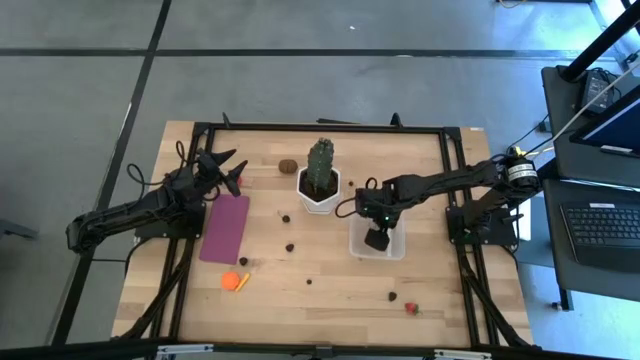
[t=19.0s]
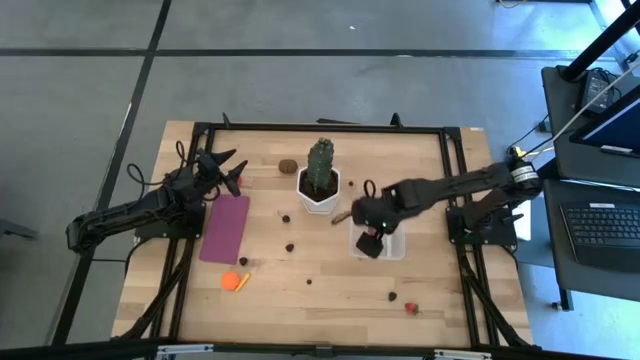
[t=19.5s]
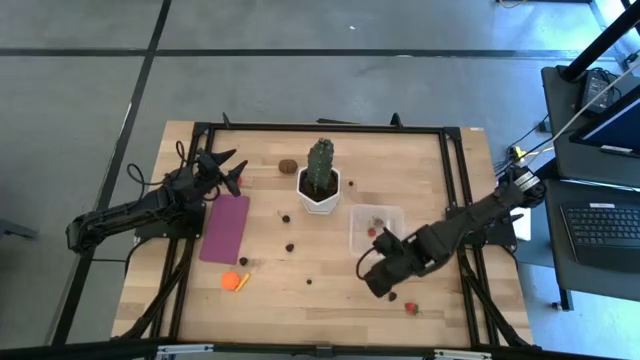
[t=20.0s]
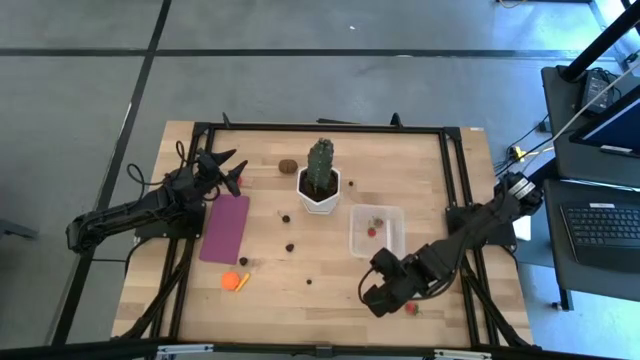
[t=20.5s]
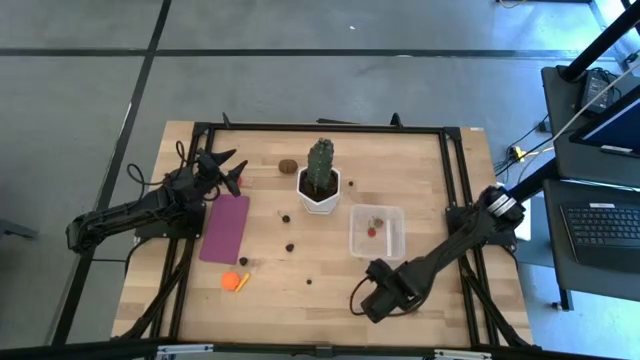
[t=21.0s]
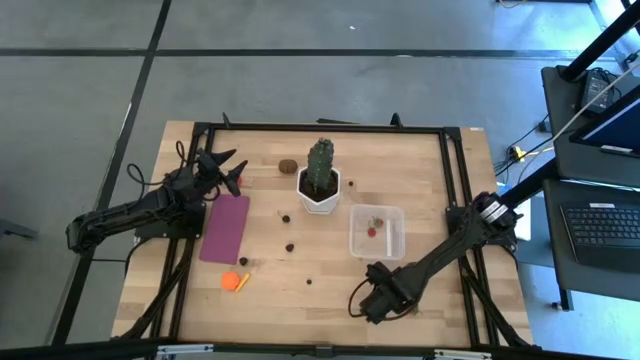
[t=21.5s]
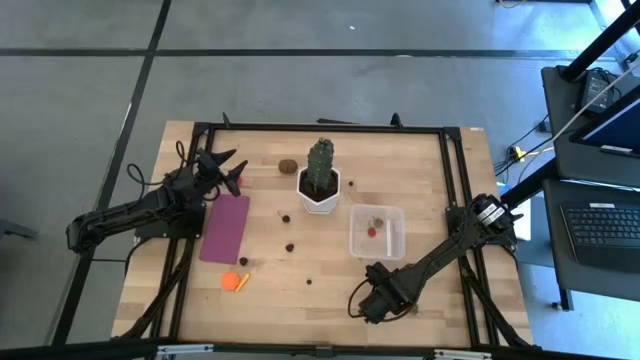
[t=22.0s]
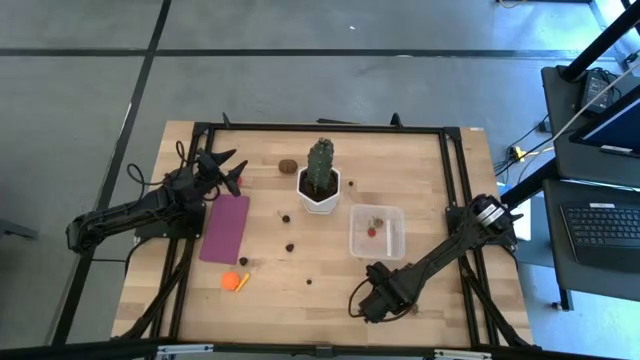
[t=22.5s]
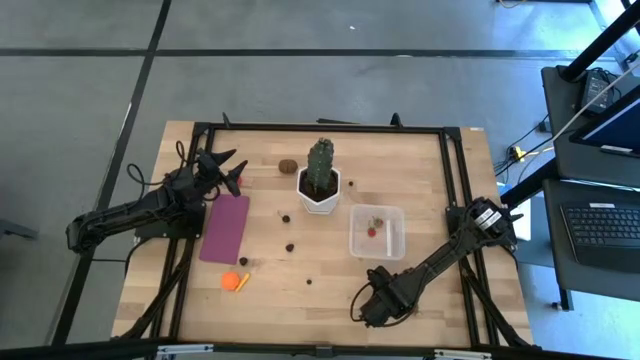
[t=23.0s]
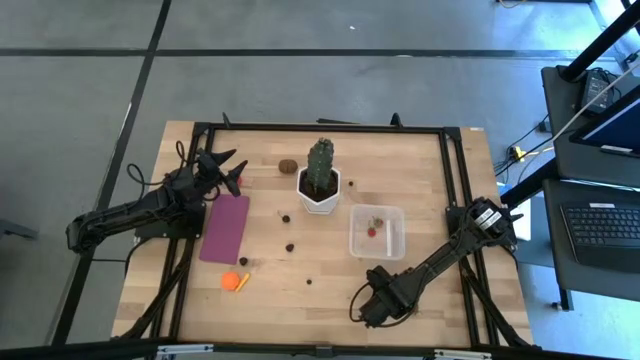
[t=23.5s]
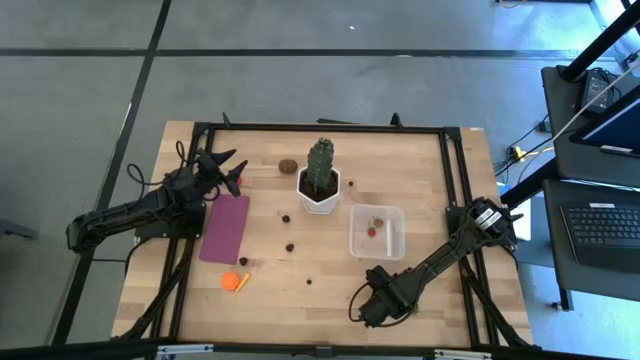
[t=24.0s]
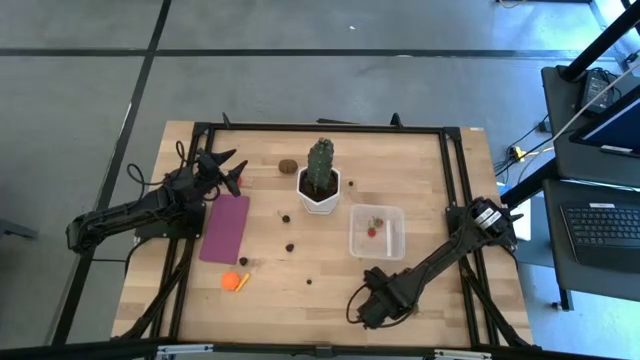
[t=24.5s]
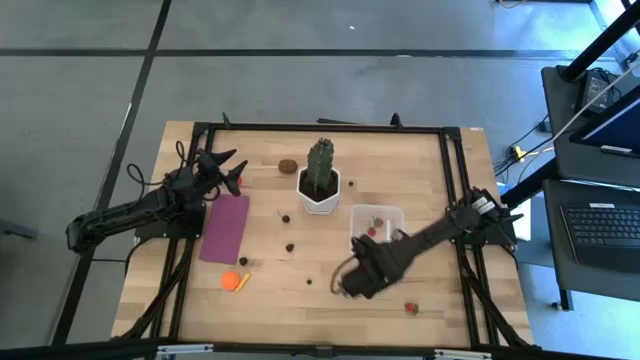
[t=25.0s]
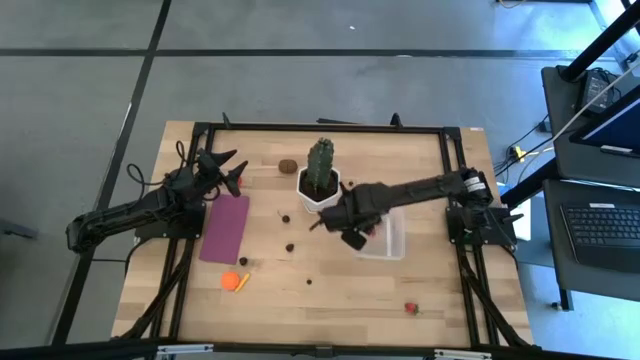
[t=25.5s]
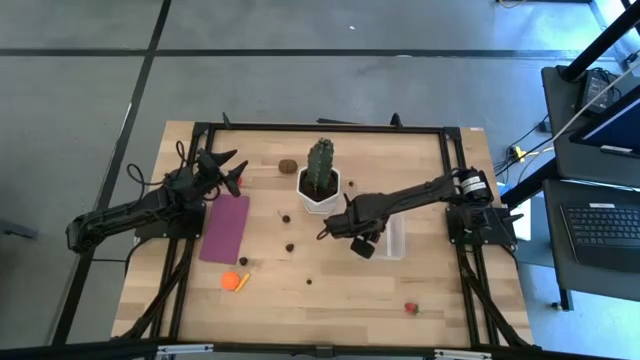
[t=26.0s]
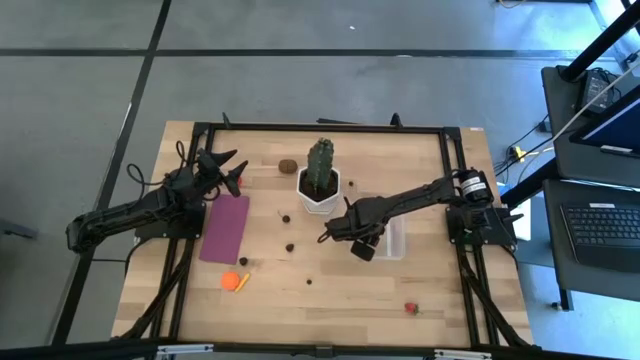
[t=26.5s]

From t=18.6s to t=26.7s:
Task: Pick and placing Produce into tupperware
Put the blackberry into the transparent bin

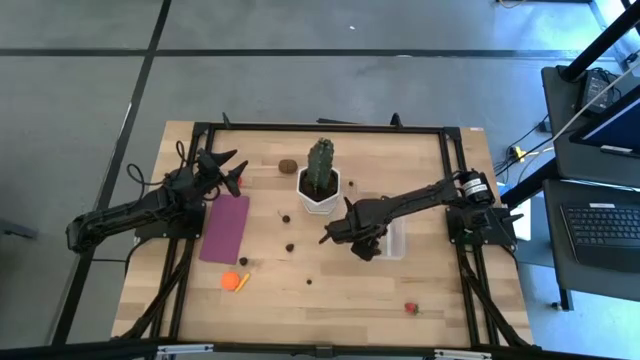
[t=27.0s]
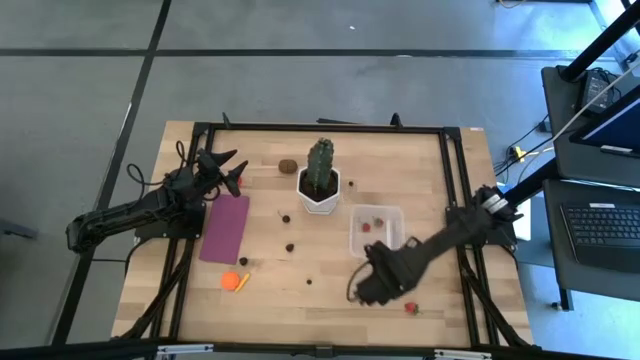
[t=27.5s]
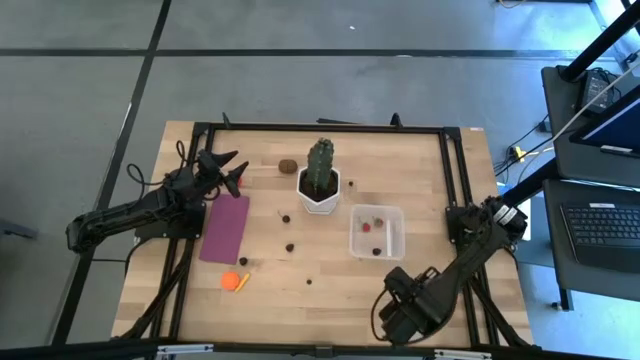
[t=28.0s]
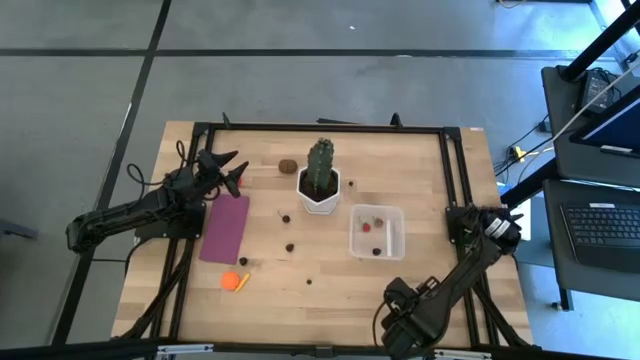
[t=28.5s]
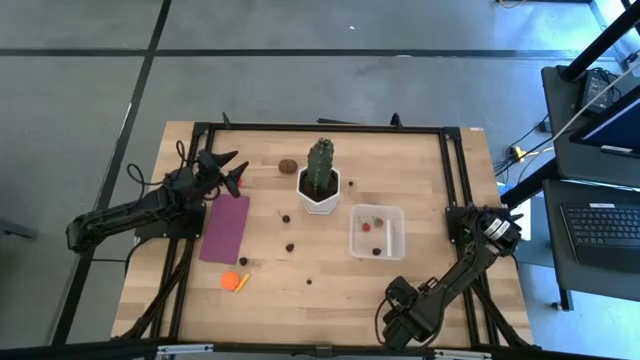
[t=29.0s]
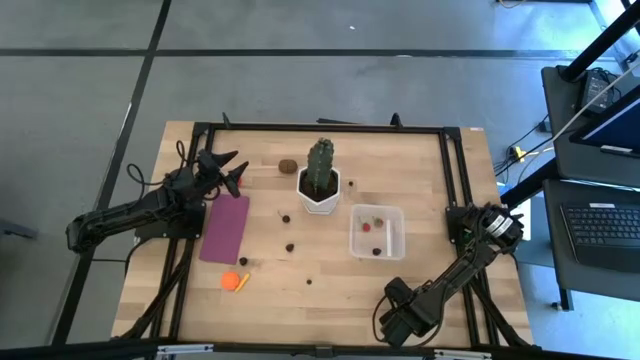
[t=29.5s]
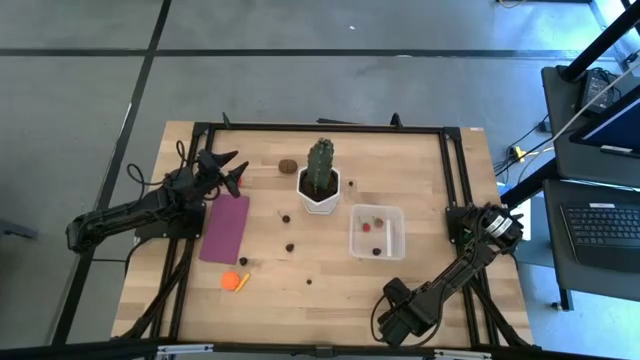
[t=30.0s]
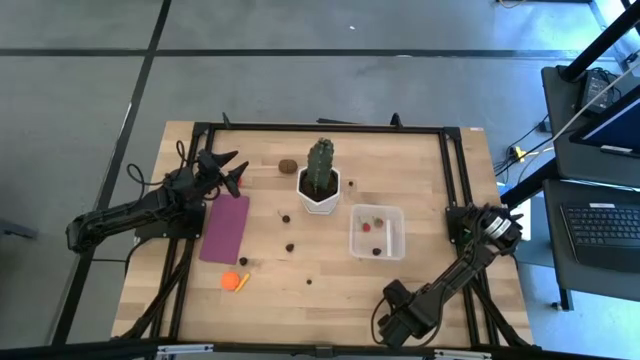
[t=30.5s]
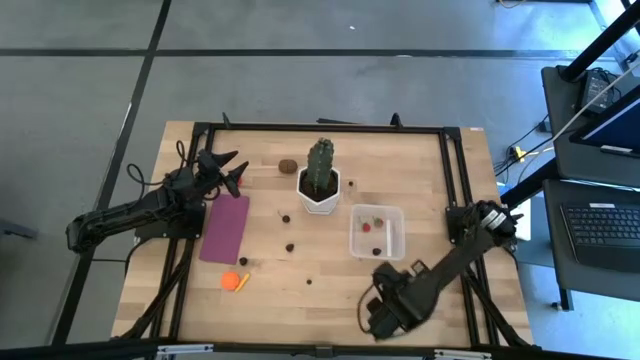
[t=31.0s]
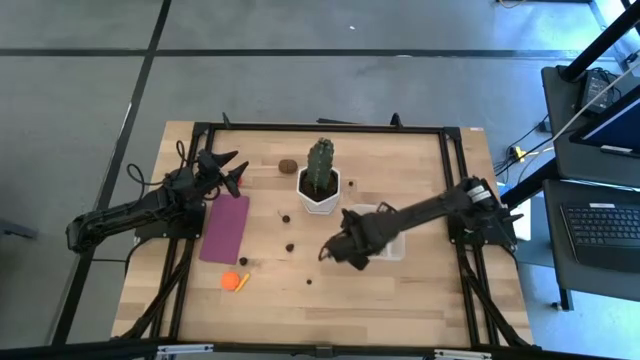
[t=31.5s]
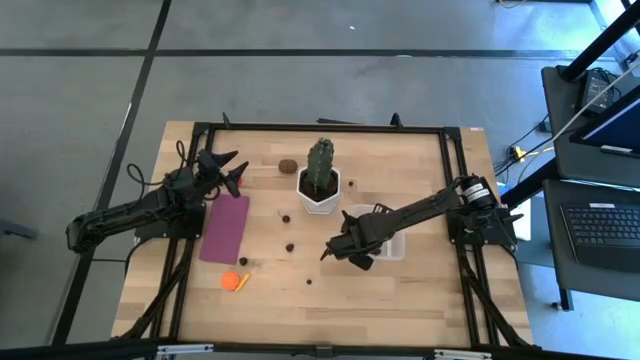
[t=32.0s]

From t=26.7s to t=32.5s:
Put the strawberry into the transparent bin

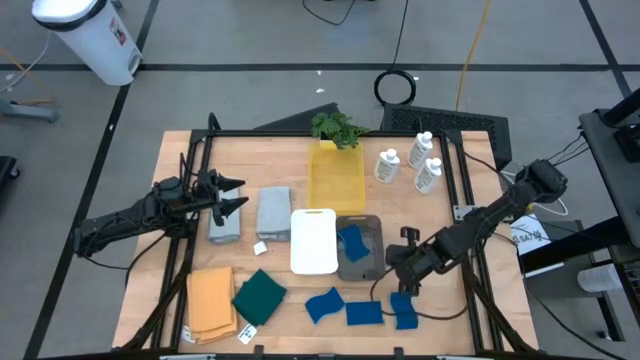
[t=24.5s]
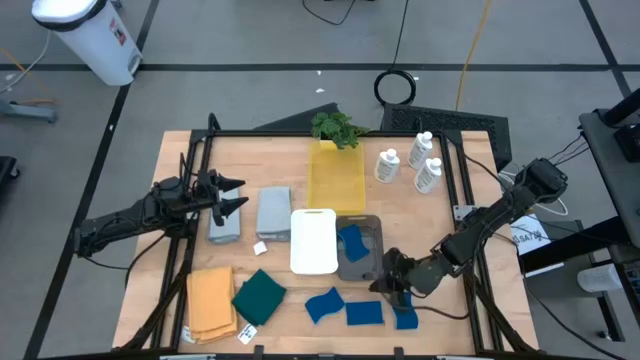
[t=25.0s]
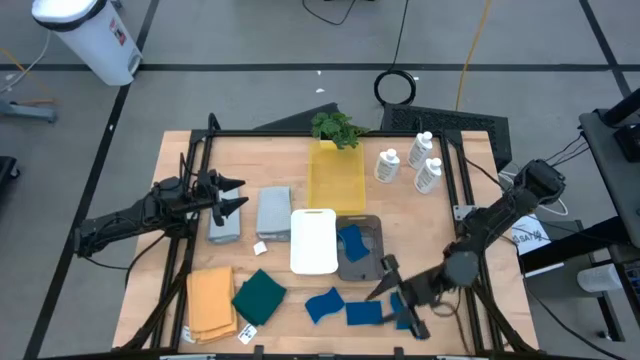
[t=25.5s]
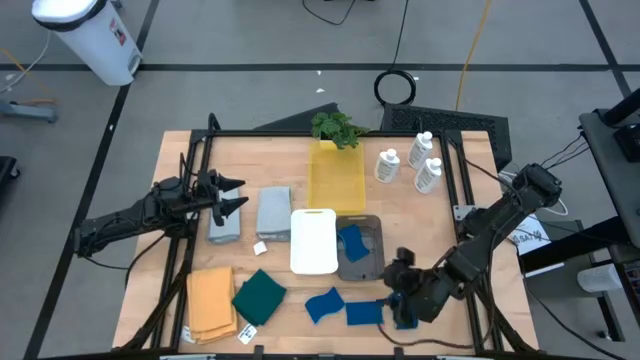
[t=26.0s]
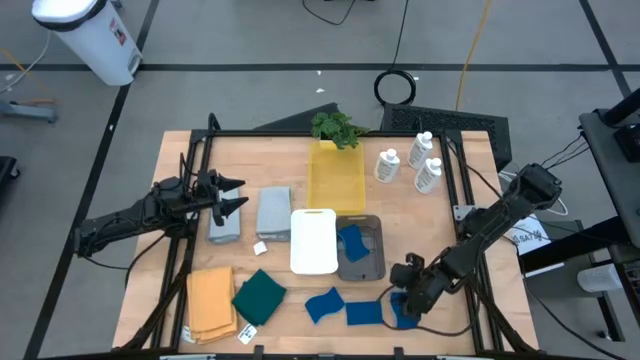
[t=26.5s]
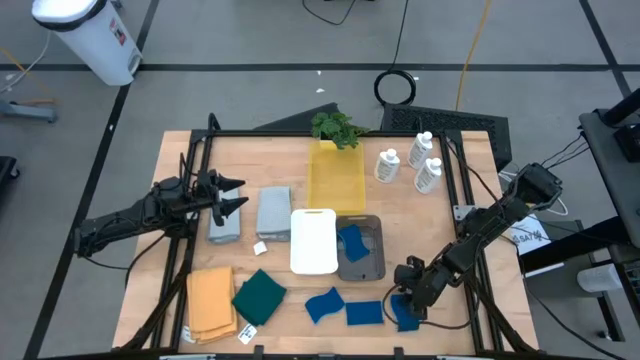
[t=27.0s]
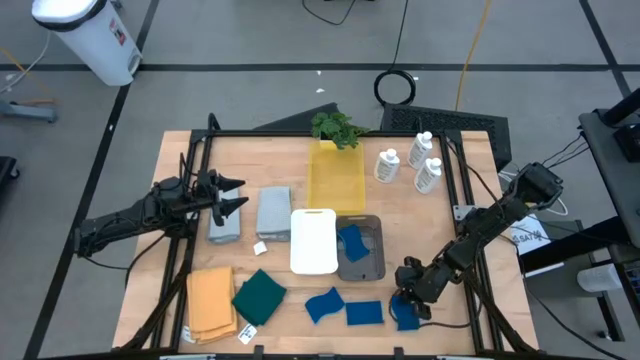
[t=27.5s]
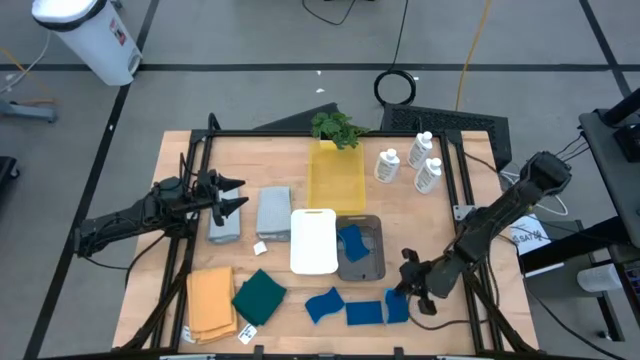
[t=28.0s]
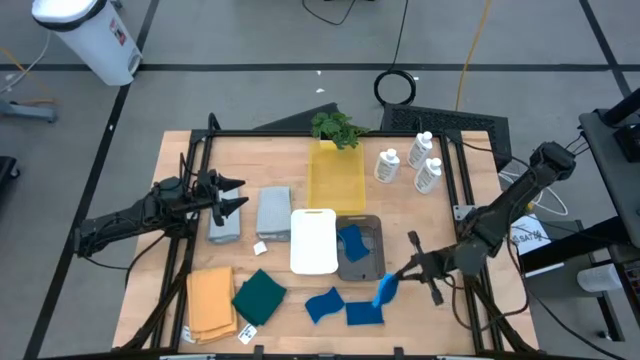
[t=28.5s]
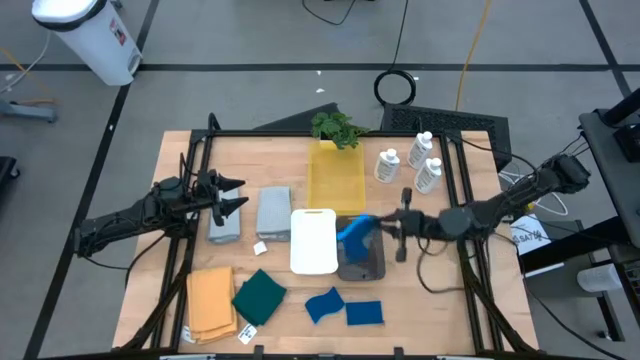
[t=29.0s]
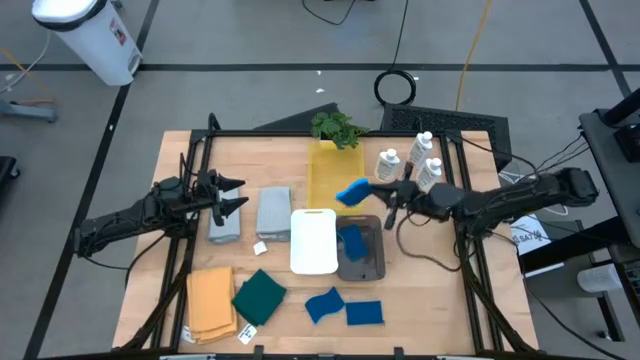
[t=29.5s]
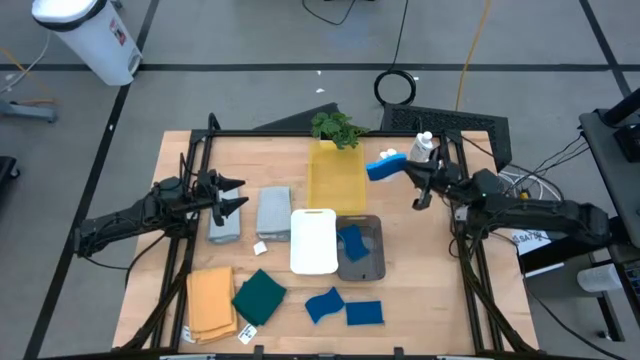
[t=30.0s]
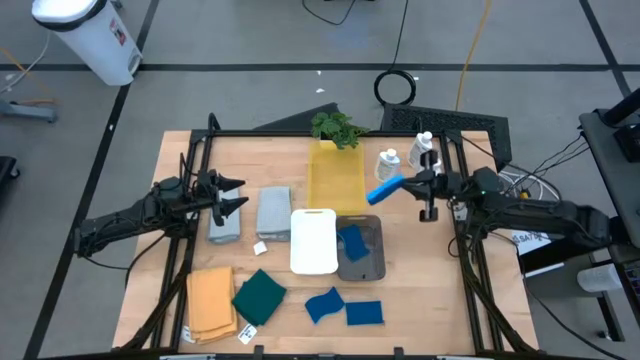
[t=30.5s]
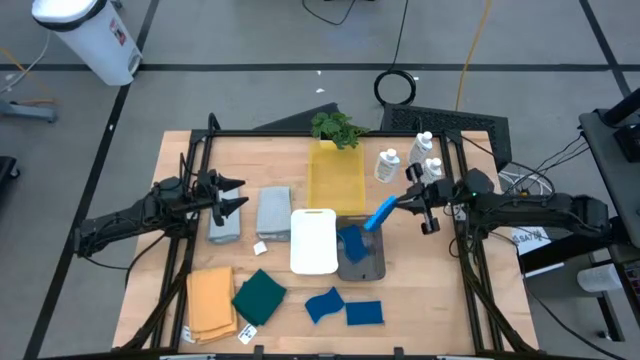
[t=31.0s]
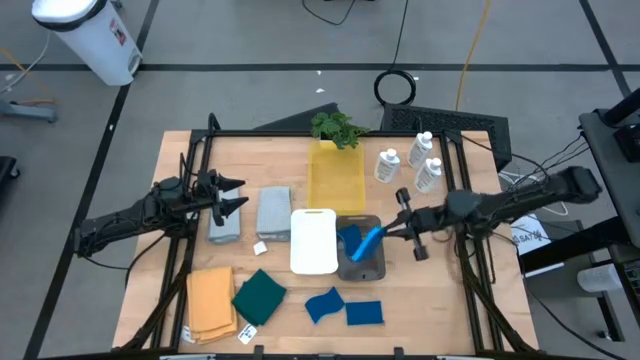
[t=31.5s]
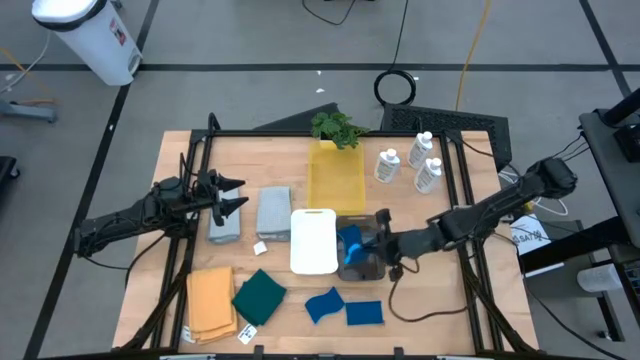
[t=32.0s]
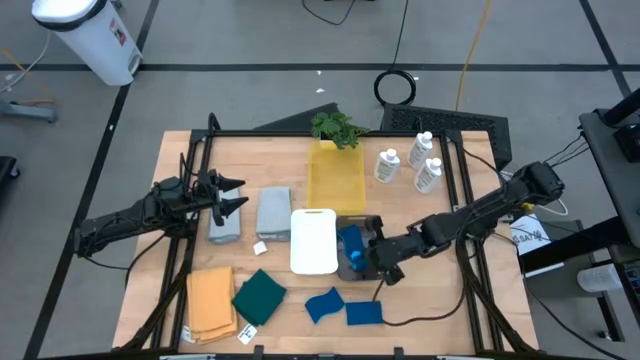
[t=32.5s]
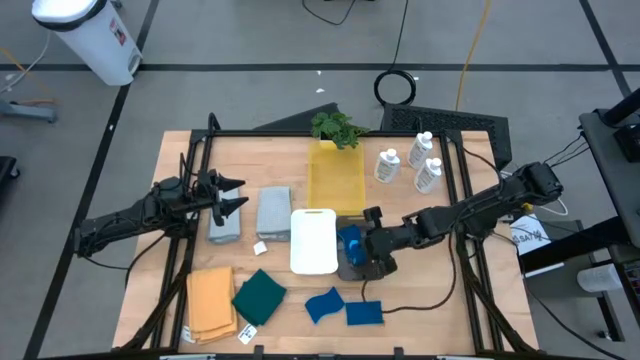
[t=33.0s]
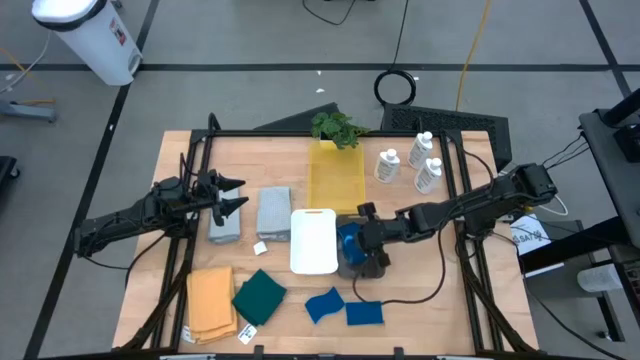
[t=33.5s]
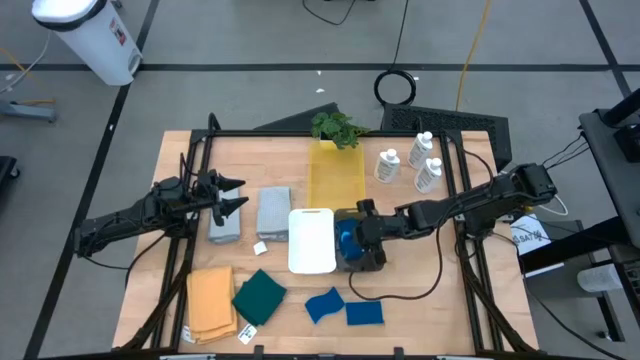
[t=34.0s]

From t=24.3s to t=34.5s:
Task: Pick & Place Kitchen Items
Put the right sponge wipe into the black bin
